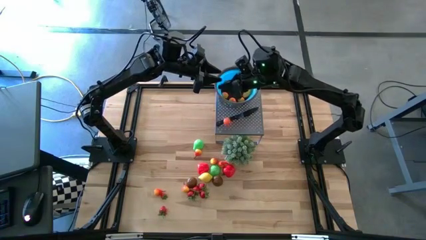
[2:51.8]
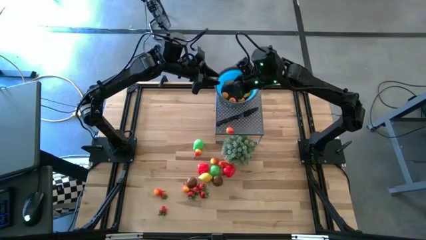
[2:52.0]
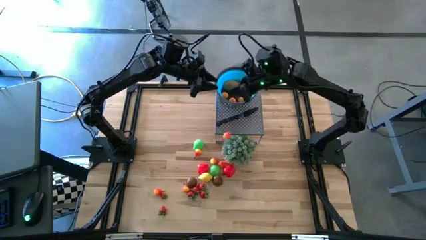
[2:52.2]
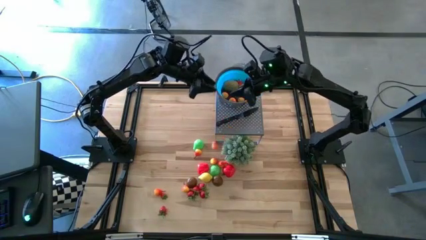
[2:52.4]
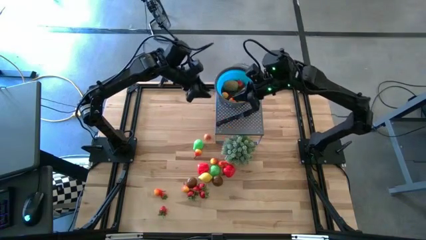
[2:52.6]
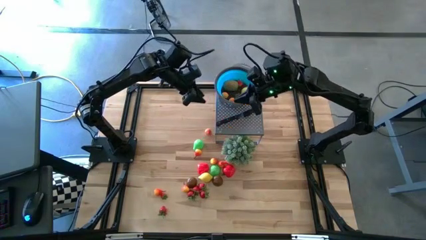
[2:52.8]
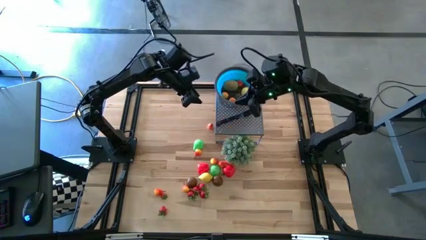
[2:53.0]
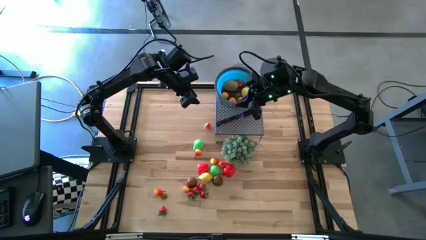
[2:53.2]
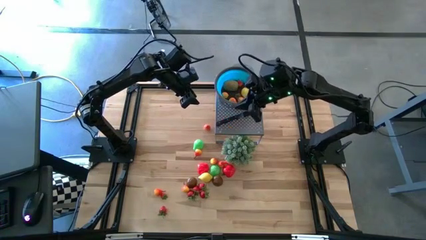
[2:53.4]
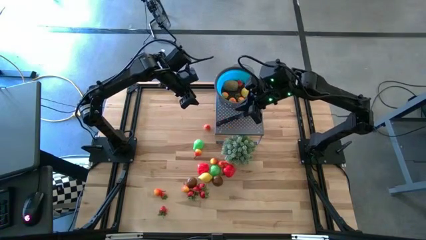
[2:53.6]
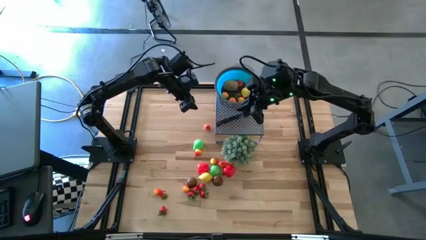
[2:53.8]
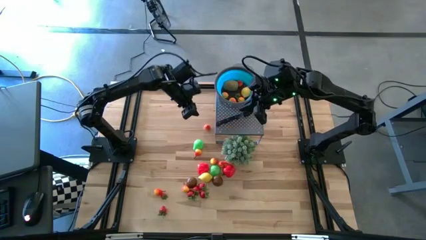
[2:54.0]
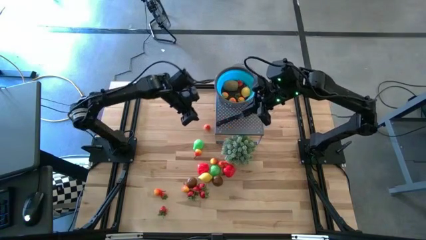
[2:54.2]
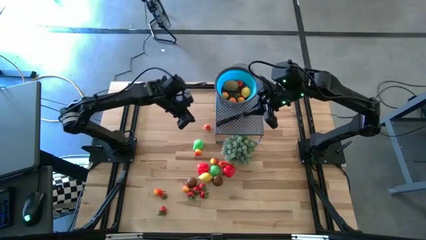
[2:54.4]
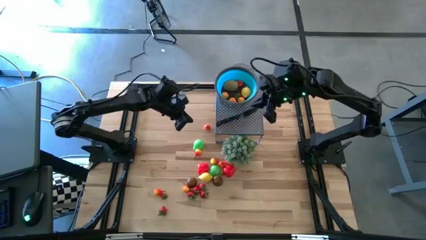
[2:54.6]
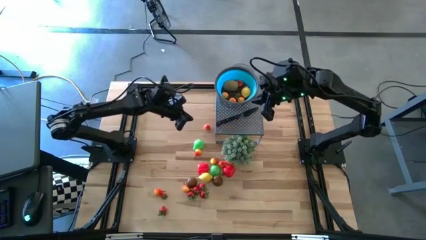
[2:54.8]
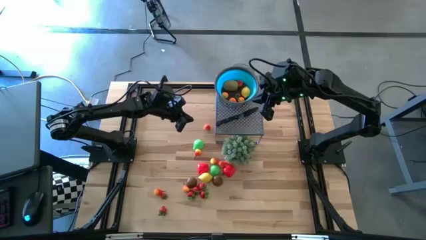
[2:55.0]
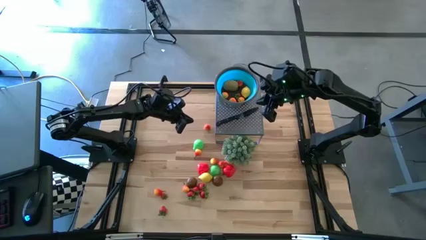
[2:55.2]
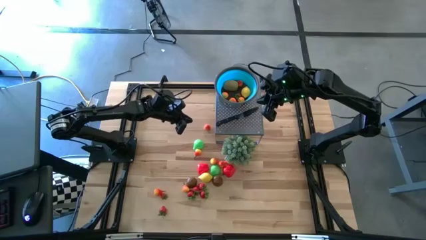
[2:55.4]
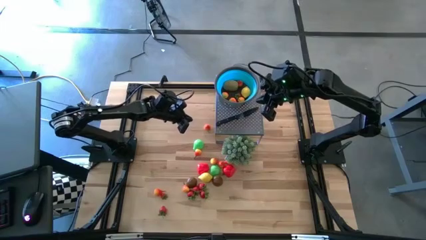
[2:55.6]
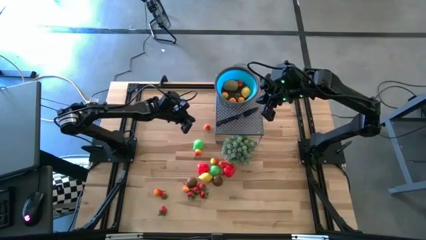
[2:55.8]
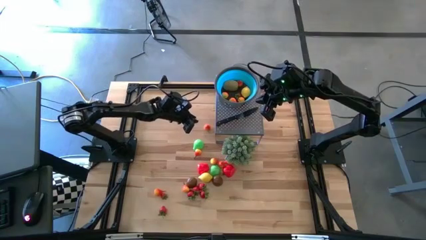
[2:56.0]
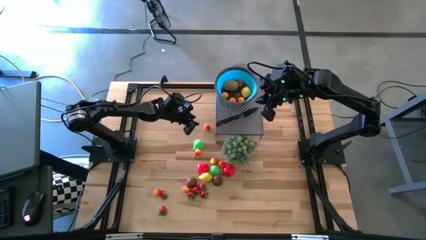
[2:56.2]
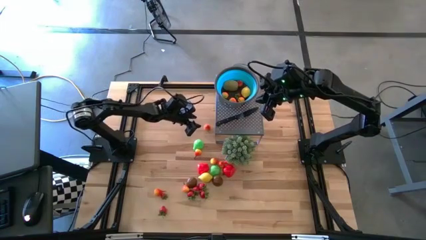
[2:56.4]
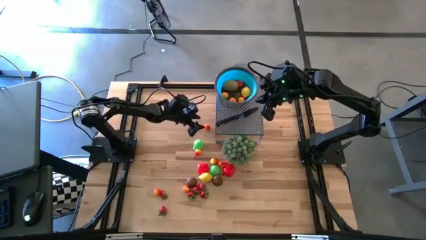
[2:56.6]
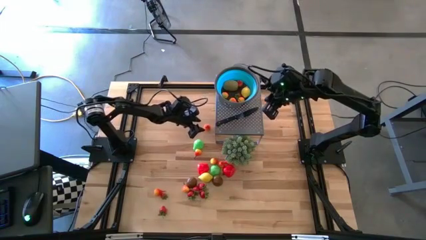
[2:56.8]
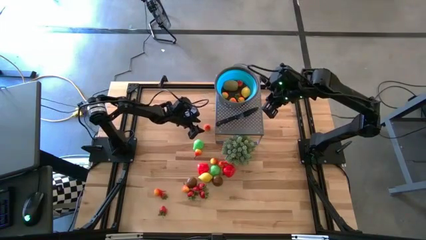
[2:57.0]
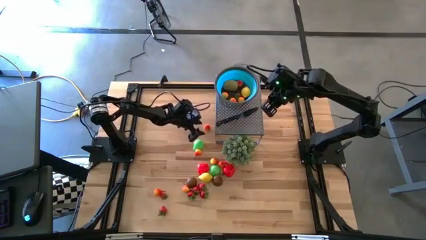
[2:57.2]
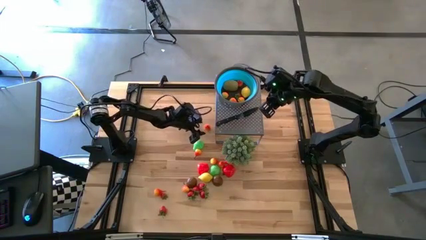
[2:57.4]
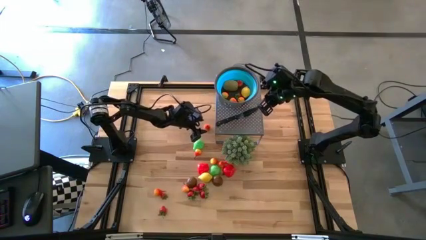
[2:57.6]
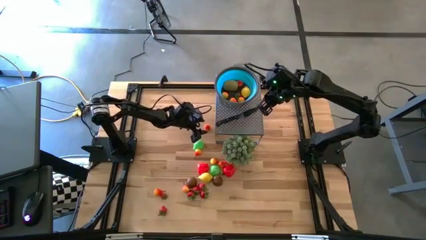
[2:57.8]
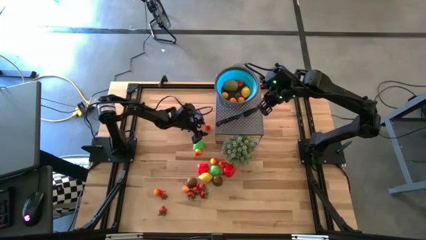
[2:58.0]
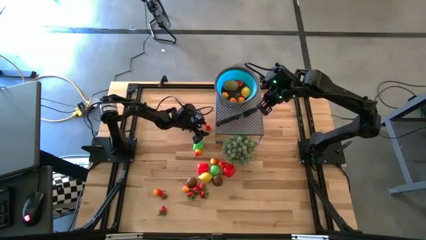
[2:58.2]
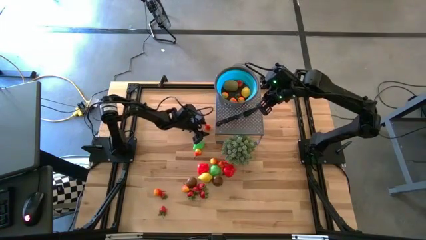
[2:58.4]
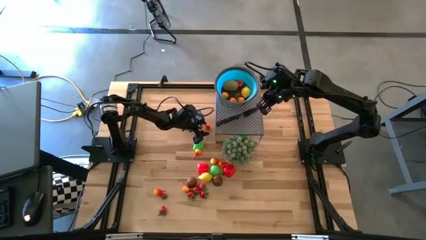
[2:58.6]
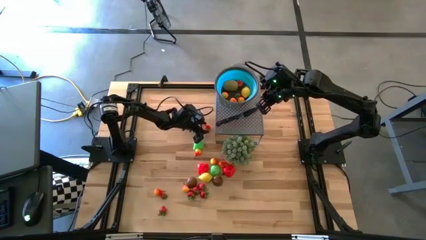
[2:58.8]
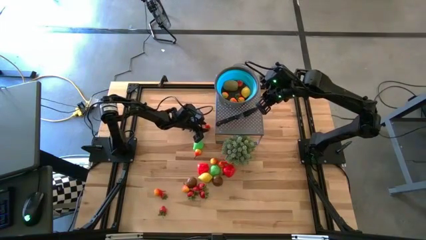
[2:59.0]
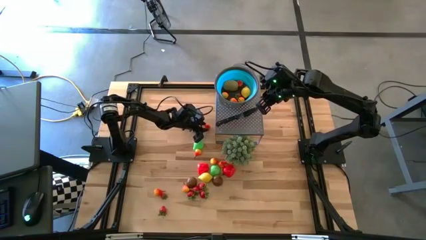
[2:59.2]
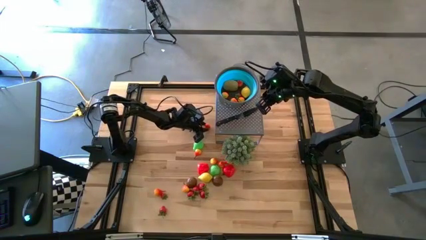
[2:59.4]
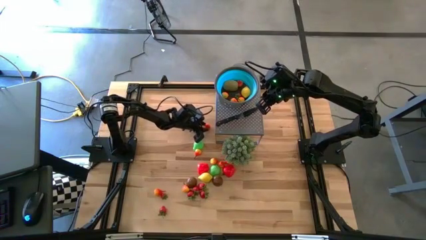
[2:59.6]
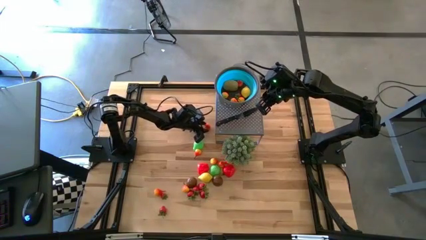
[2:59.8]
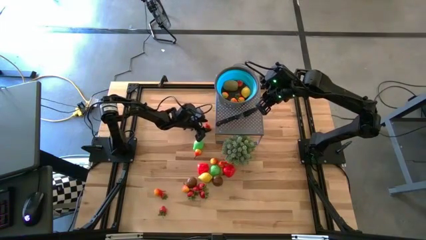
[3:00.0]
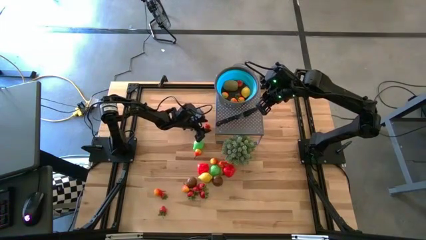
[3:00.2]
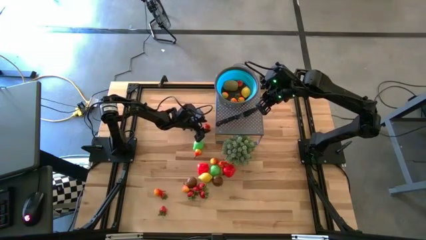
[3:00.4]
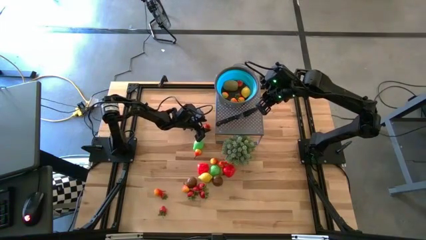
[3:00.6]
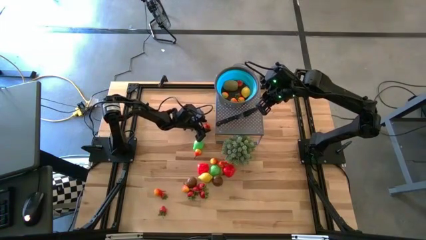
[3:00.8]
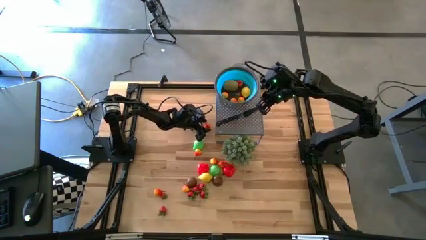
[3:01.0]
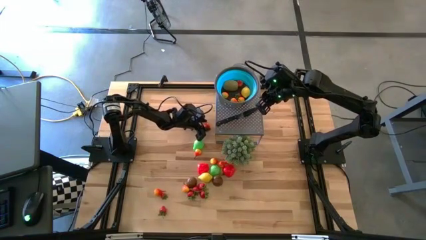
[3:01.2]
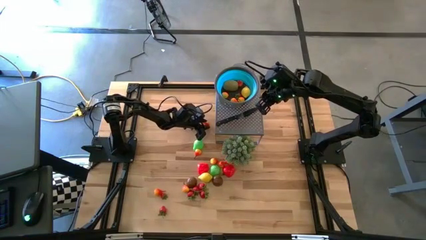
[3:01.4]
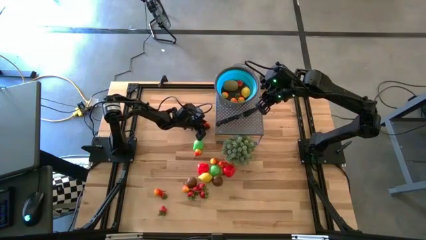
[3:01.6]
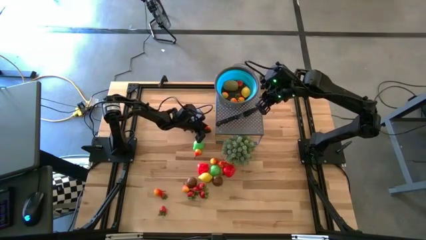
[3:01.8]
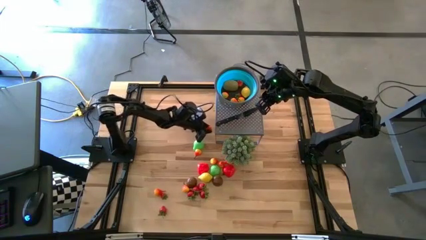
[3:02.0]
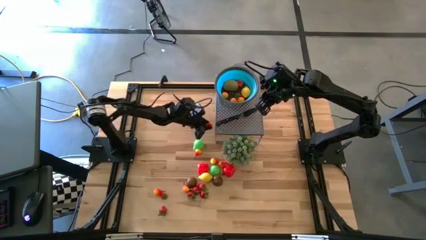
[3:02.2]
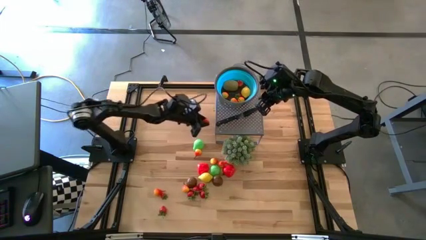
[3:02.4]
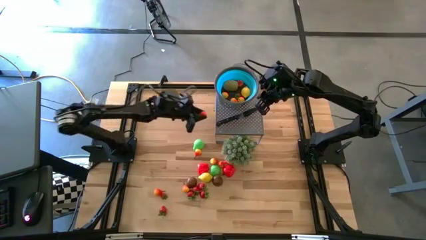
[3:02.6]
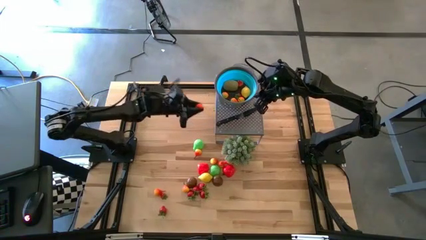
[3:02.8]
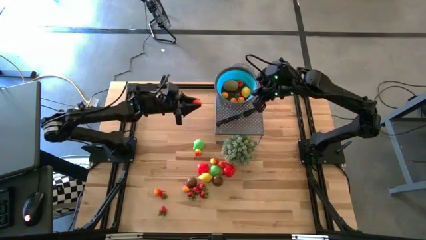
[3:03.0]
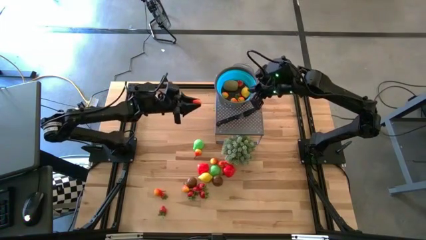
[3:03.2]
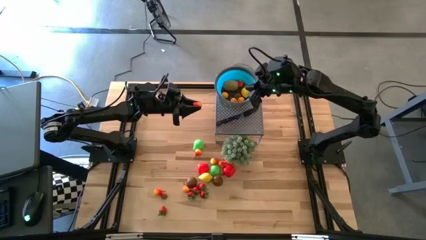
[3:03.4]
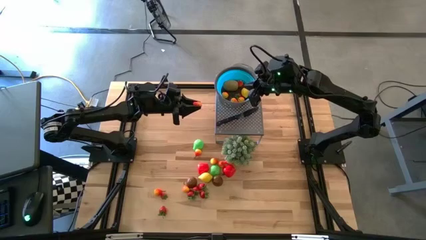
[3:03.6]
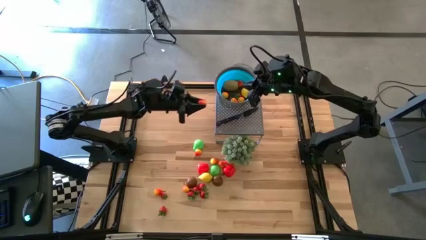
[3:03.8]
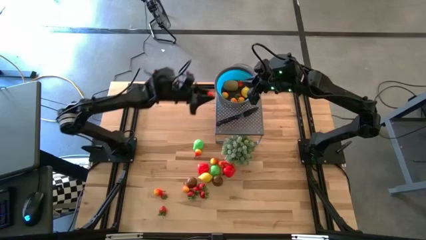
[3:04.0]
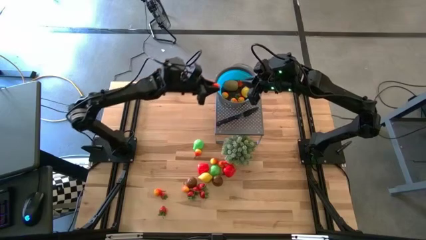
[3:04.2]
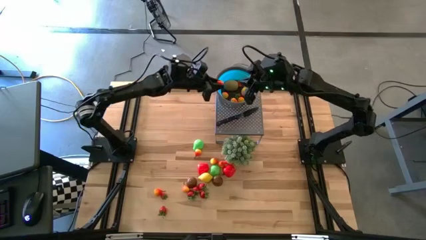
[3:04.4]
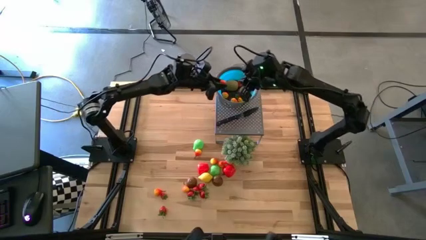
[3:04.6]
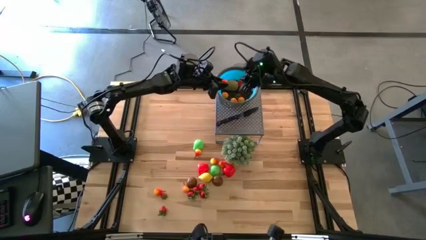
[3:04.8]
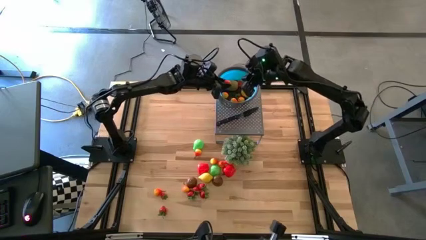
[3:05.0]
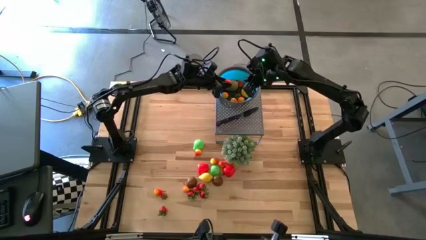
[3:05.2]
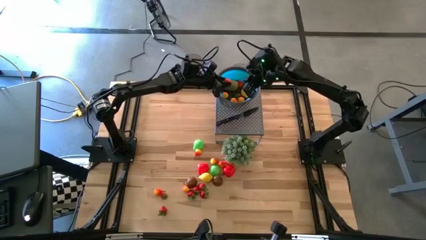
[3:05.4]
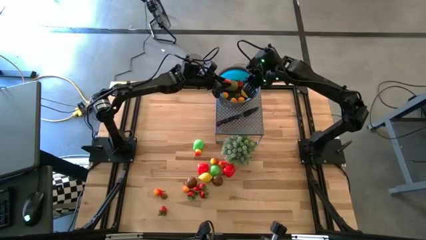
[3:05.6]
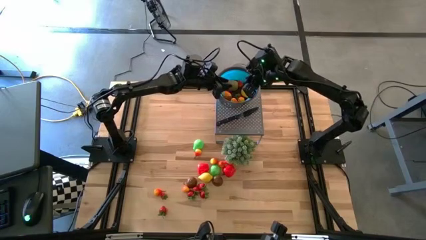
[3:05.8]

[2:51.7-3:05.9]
Task: Pick & Place Fruit
Put the orange pear into the blue strainer bowl

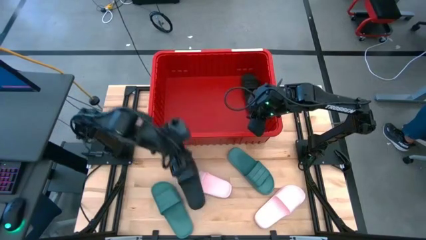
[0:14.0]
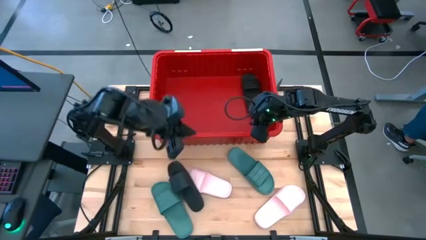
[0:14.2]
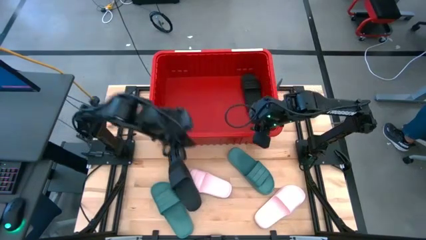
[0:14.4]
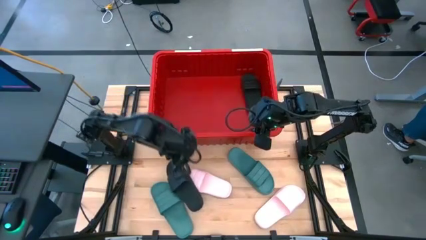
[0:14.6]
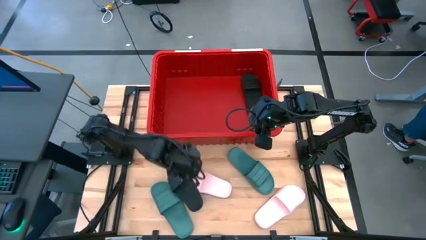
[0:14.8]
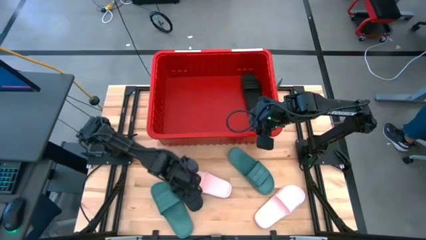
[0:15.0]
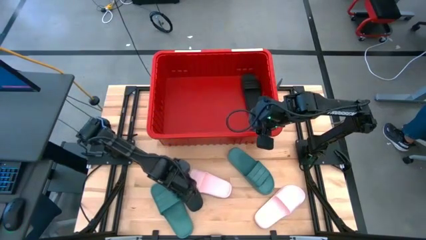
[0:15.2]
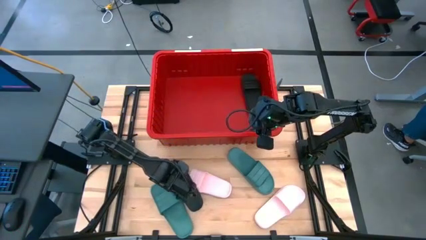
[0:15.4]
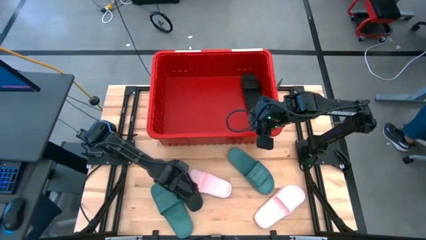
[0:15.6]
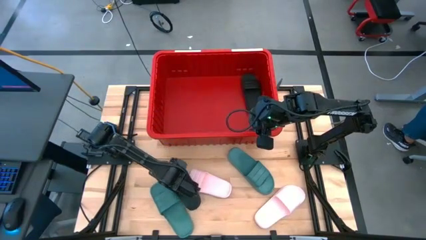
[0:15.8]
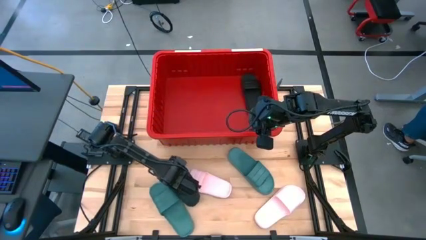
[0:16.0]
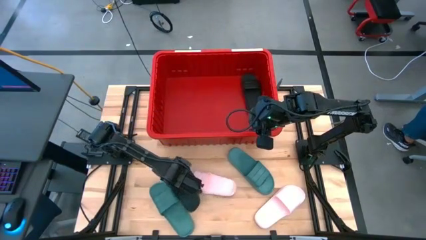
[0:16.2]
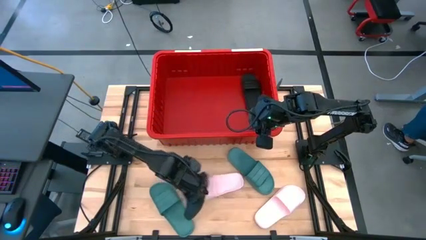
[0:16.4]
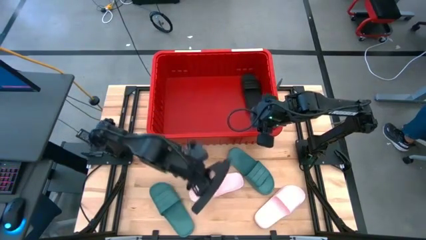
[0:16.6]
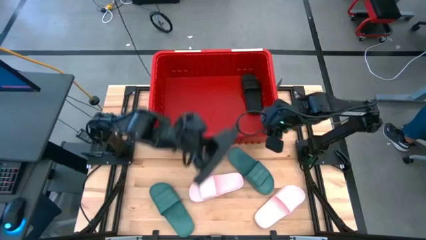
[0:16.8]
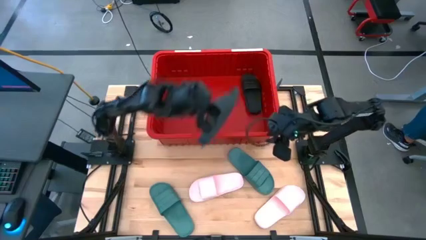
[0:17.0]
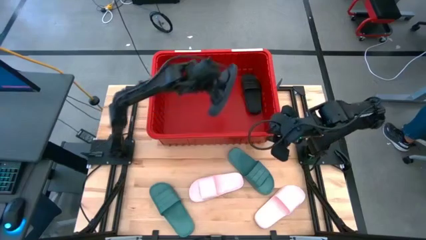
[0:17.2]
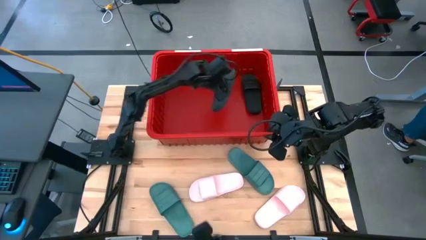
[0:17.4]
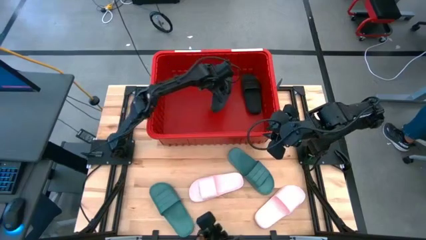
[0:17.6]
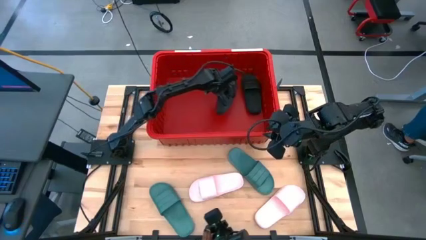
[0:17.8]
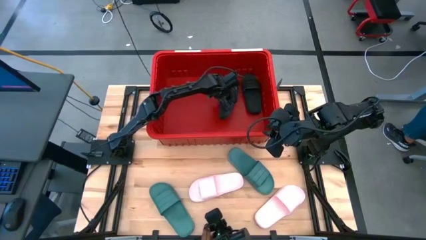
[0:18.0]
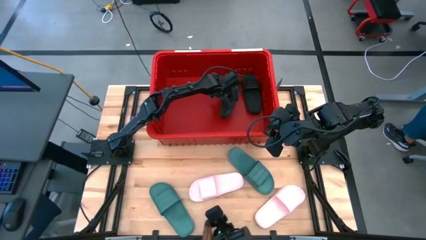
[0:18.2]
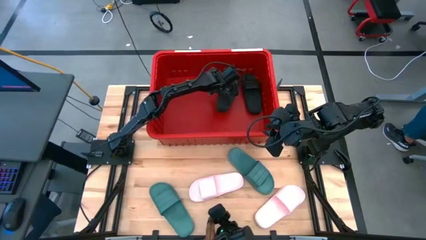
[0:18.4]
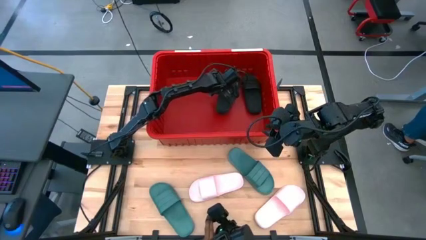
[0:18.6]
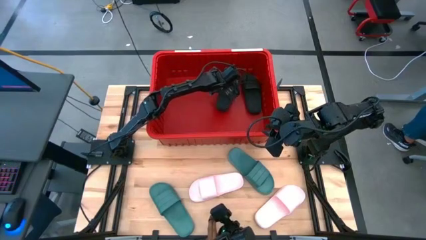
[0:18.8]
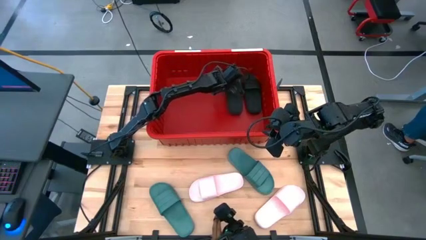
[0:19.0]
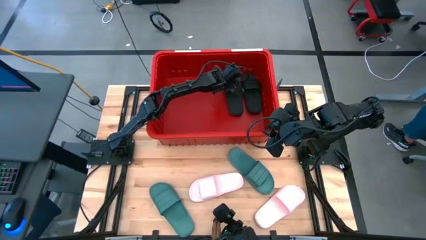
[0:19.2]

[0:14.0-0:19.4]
Task: Pick and place slides into bin
Put the black slide into the container
